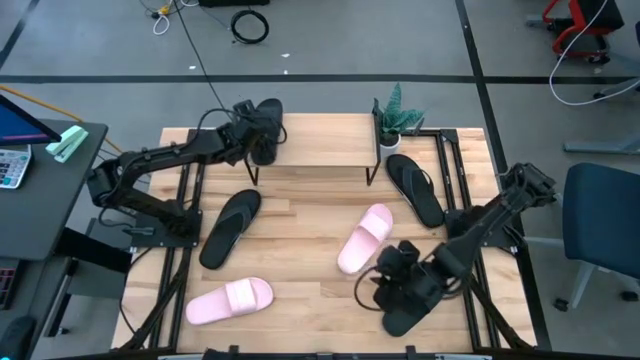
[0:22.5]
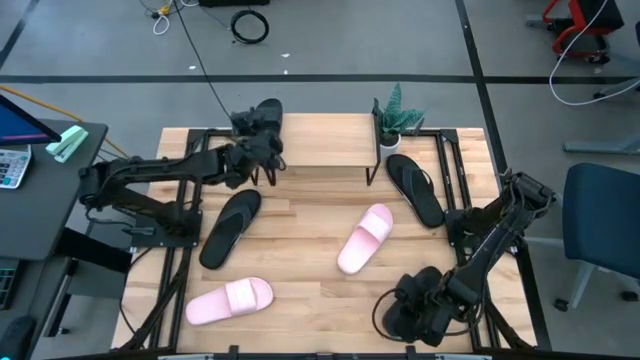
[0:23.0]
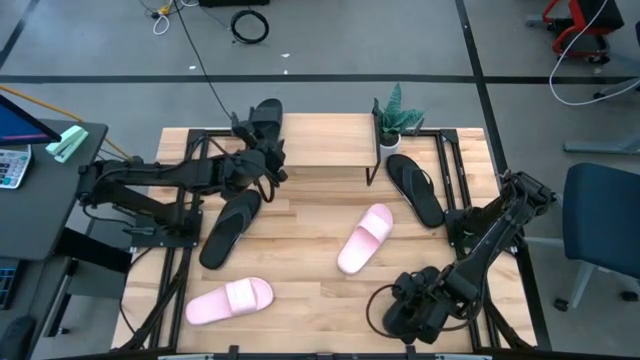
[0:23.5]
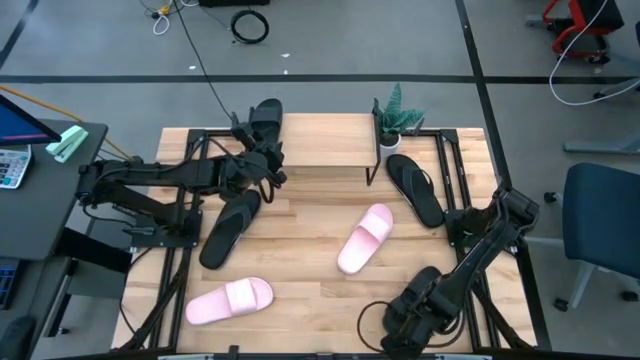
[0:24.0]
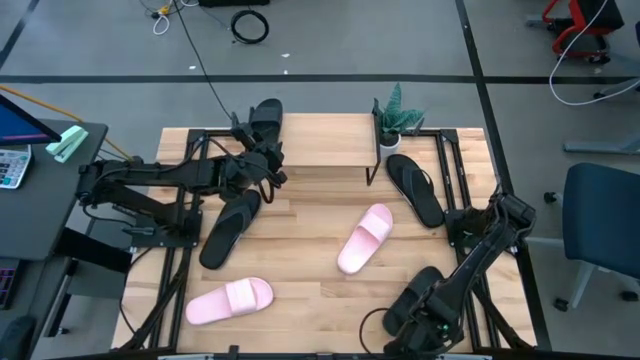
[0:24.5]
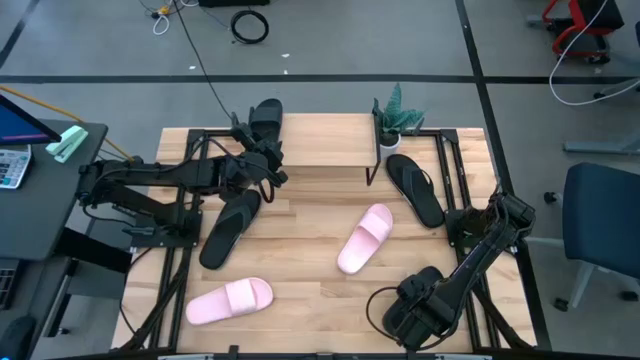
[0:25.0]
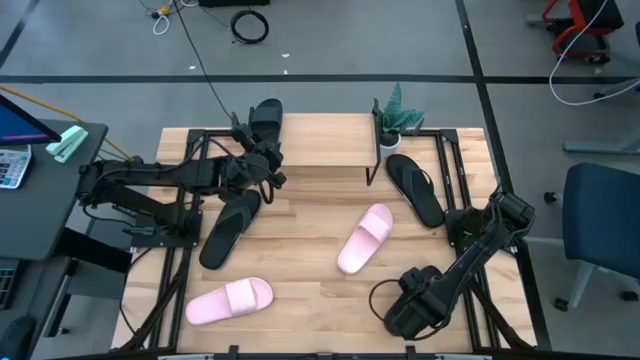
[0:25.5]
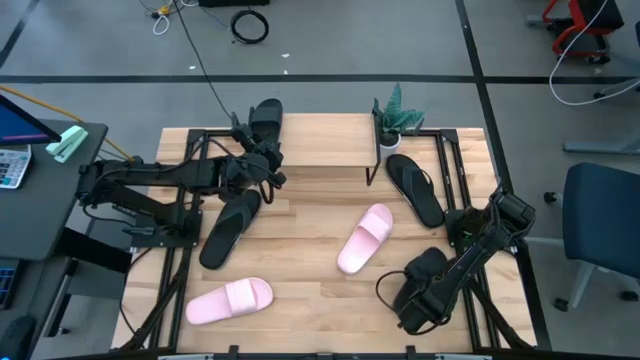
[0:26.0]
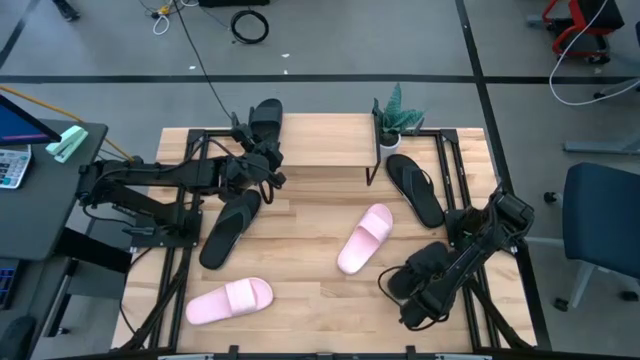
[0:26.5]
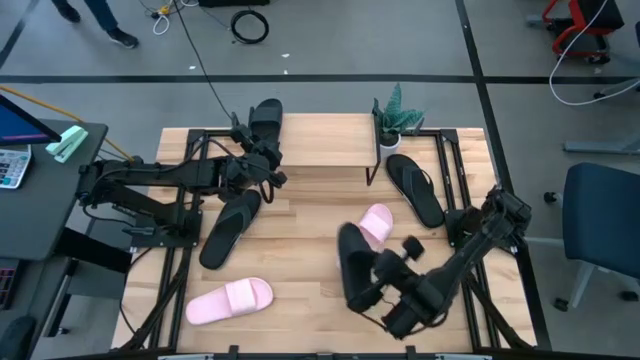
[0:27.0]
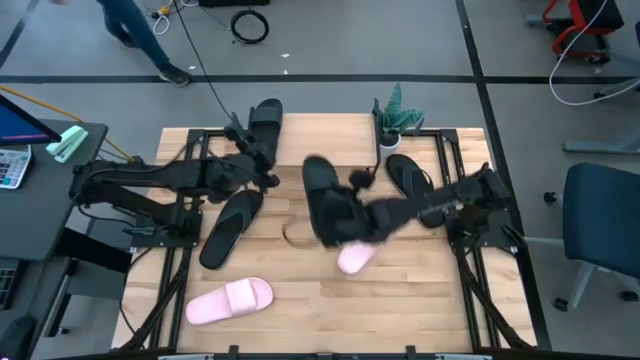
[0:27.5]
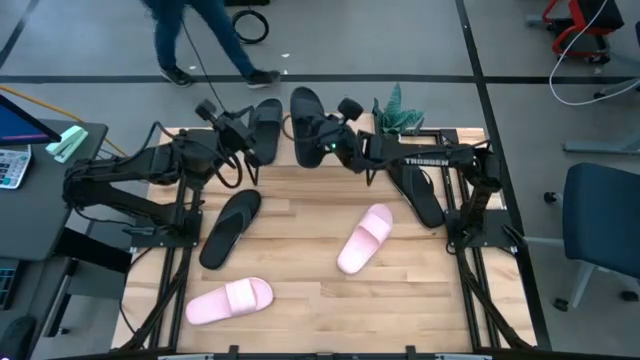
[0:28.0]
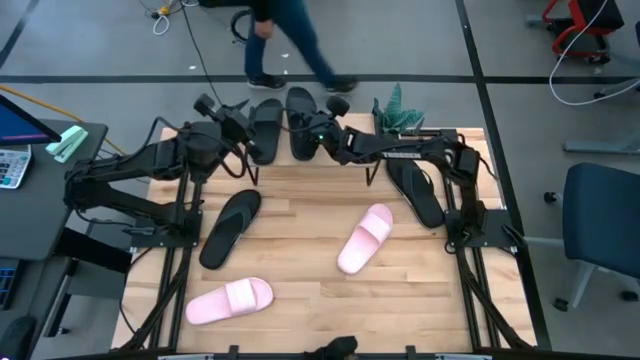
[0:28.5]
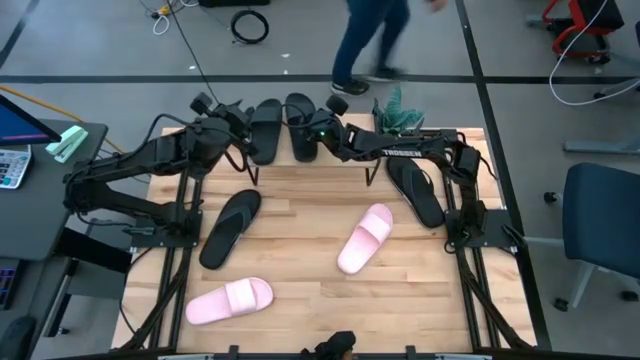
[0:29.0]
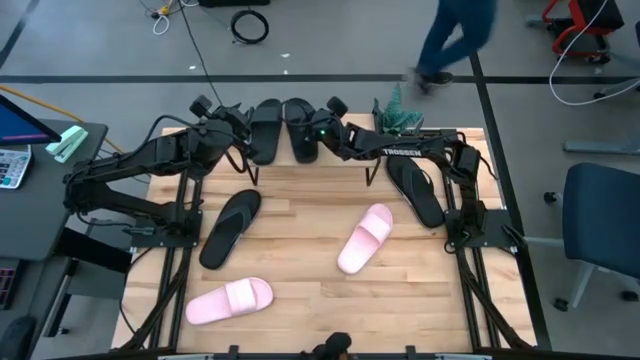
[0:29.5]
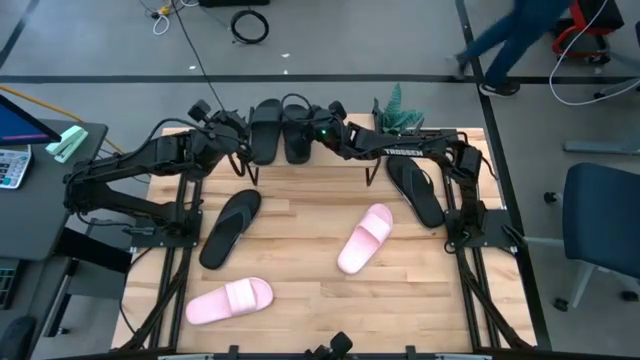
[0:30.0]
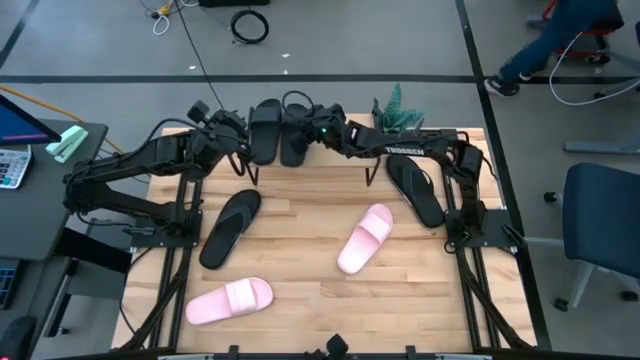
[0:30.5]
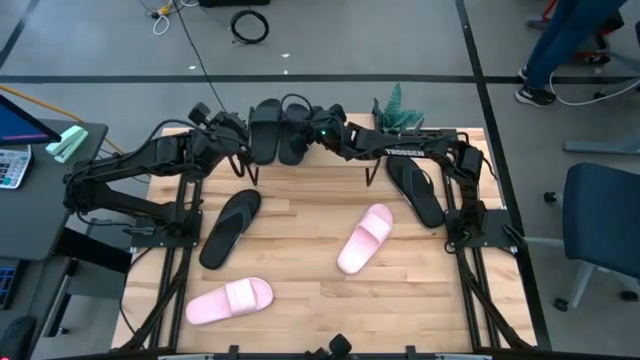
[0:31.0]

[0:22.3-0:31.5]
Task: Pick and place slides into the shelf
Put the bottom black slide on the shelf

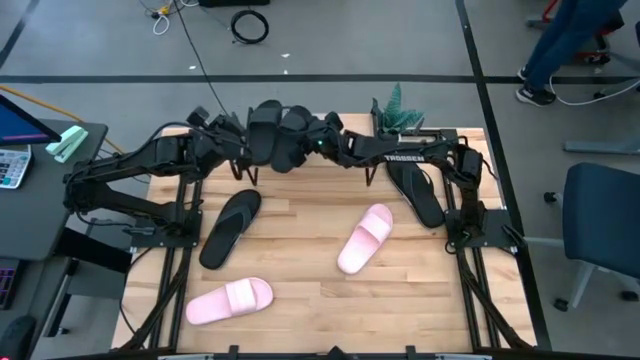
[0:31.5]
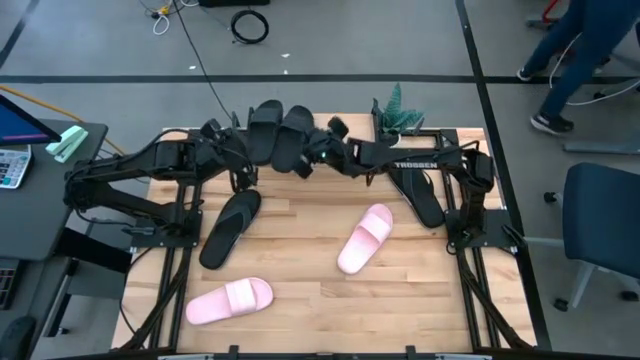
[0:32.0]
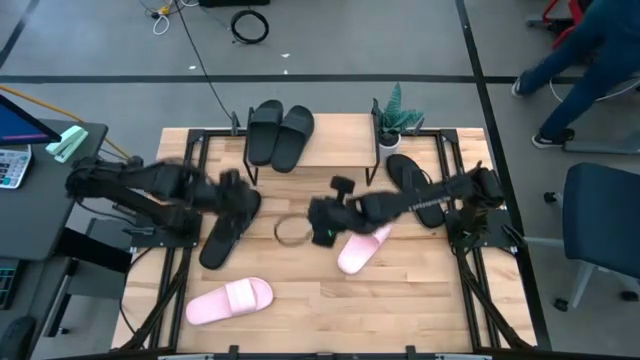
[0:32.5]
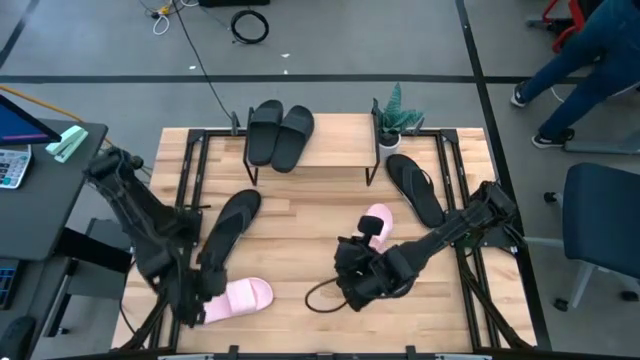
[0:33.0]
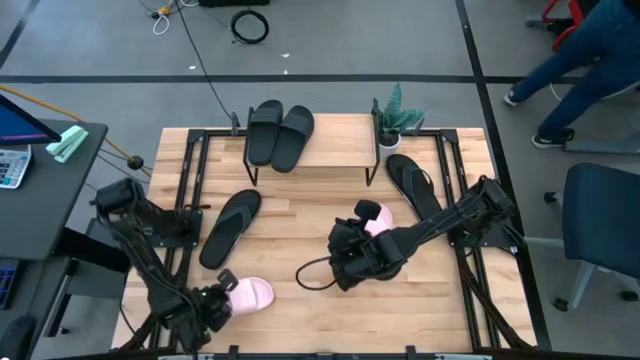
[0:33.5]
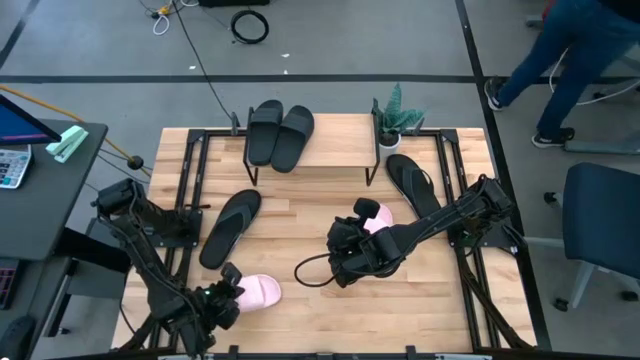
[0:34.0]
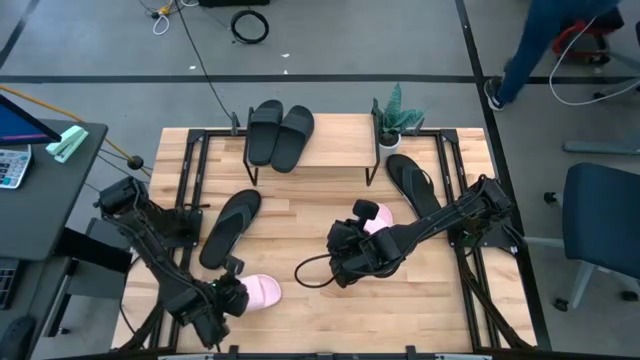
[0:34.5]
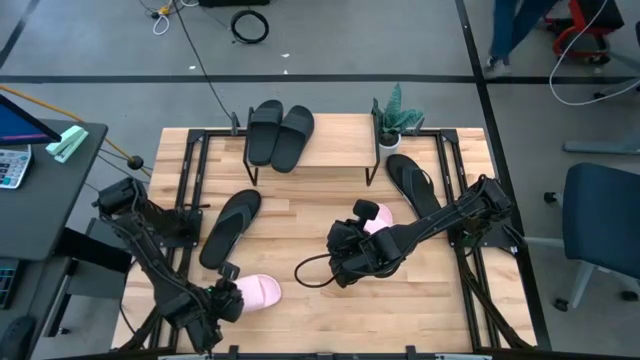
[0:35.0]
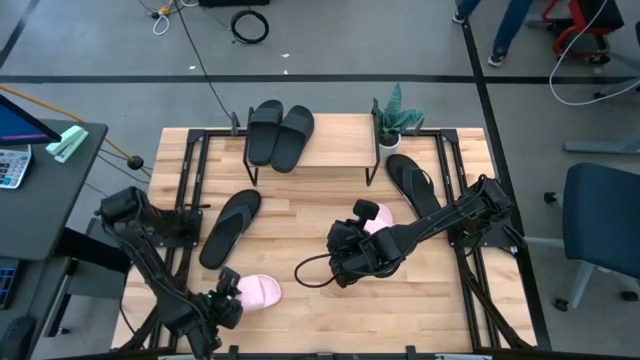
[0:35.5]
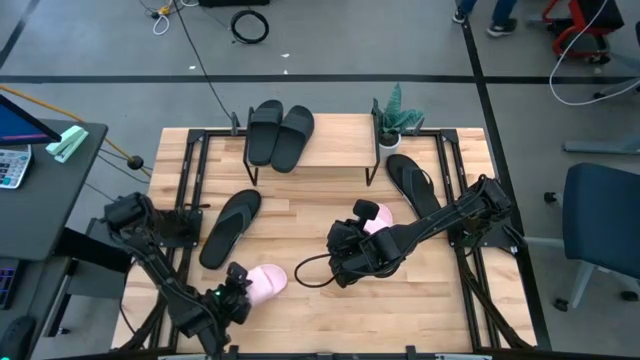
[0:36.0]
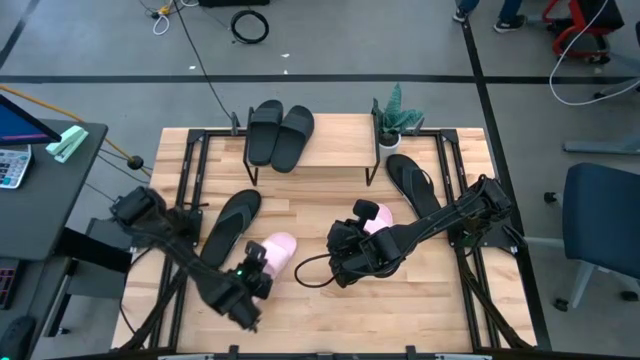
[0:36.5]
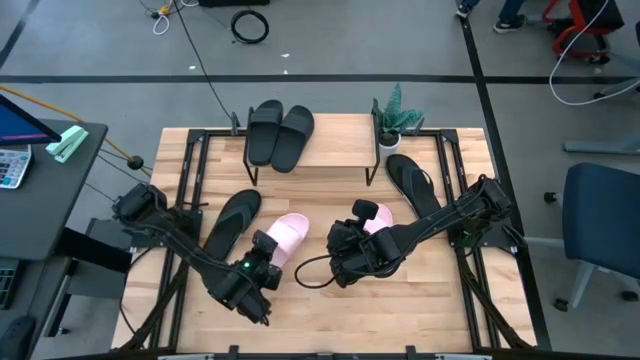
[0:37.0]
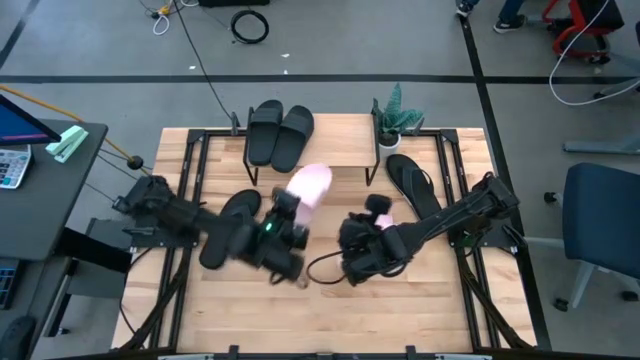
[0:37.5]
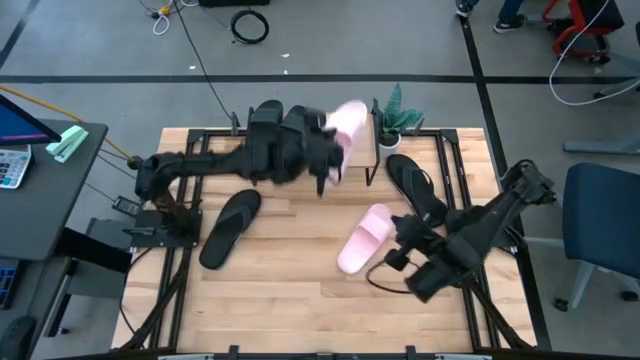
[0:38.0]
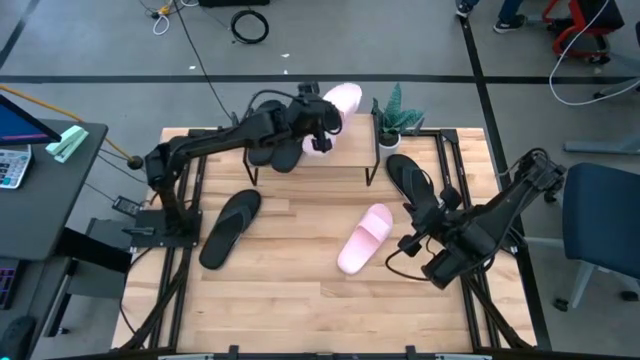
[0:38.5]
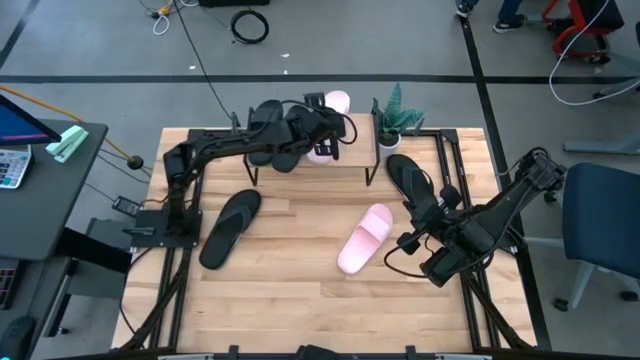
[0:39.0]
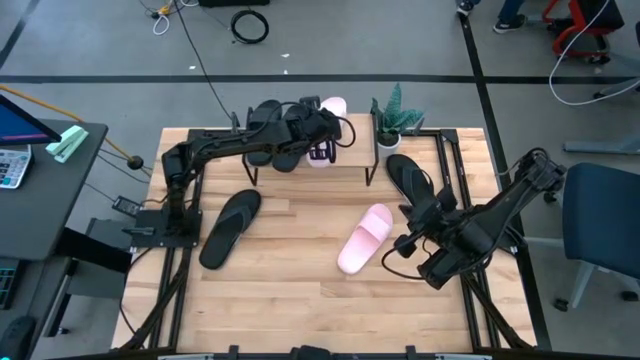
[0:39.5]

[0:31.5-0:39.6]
Put the left pink slide on the shelf

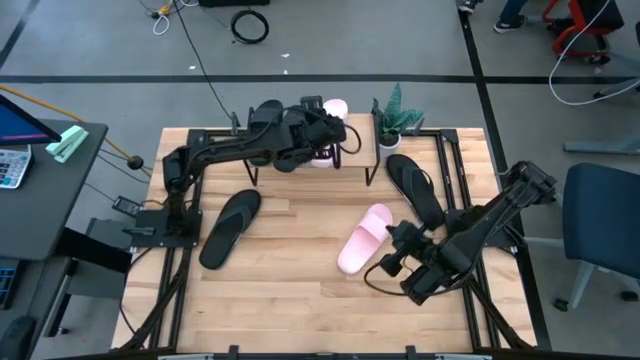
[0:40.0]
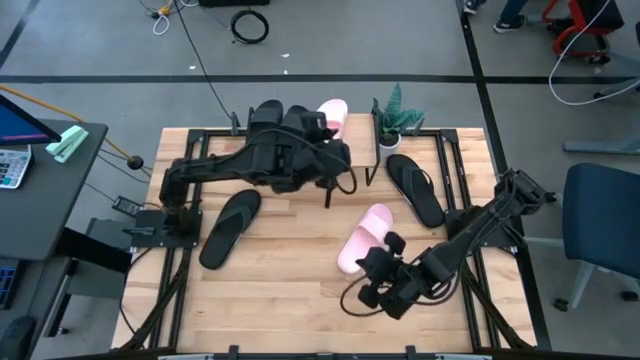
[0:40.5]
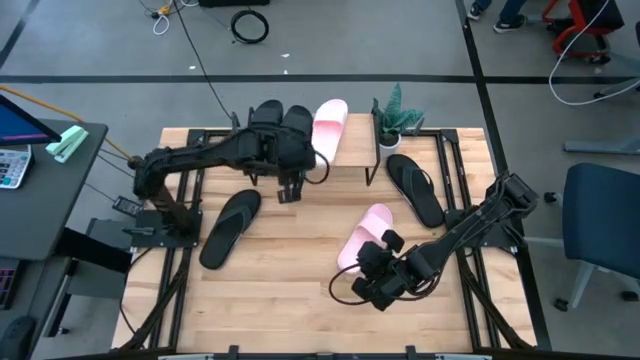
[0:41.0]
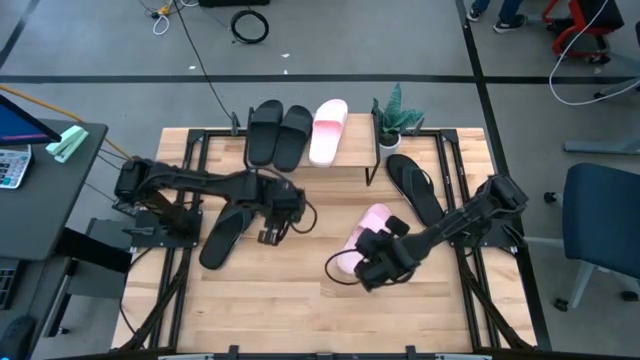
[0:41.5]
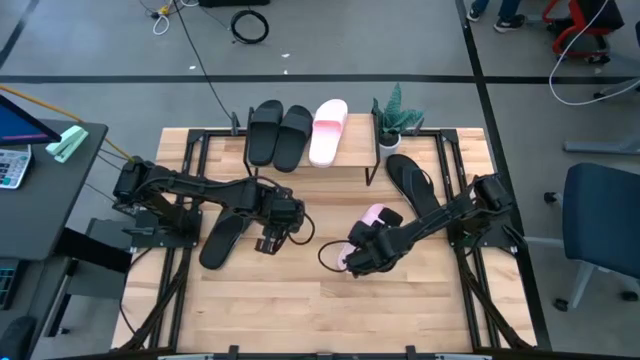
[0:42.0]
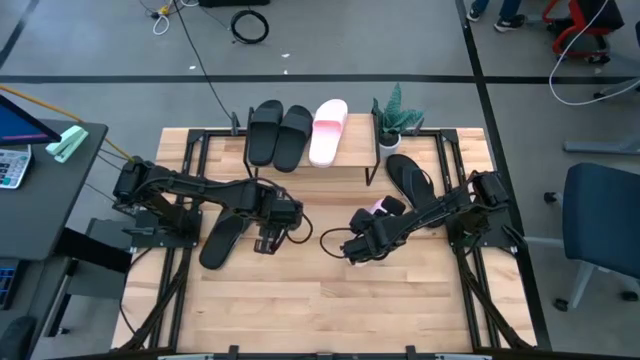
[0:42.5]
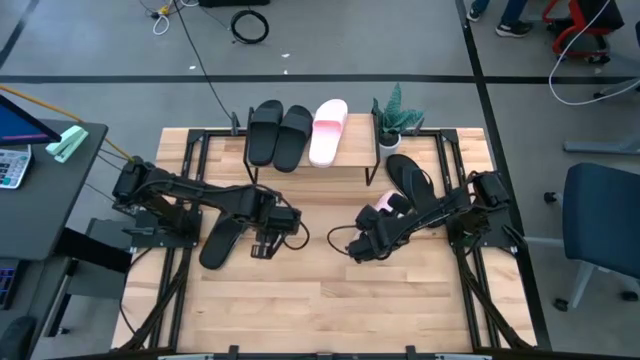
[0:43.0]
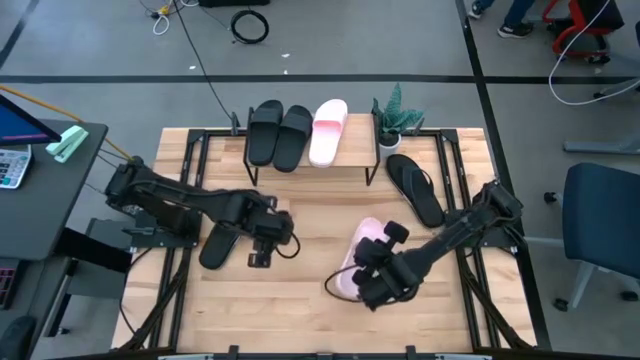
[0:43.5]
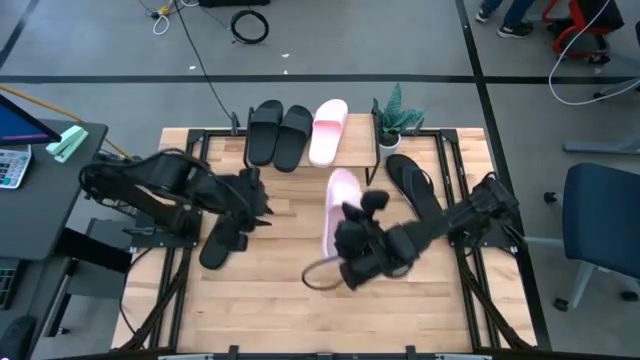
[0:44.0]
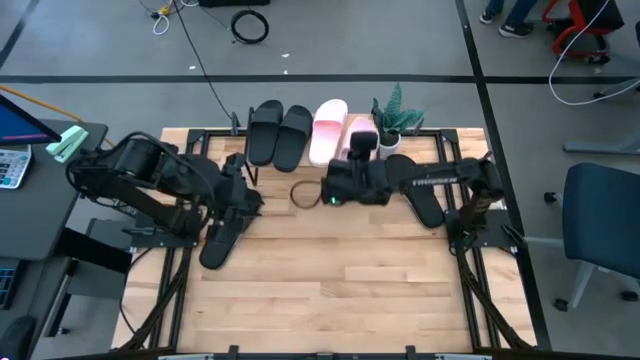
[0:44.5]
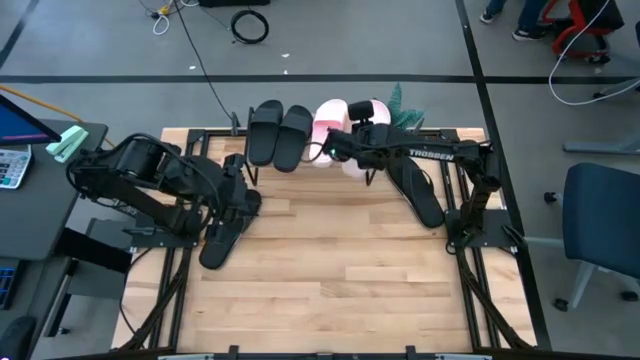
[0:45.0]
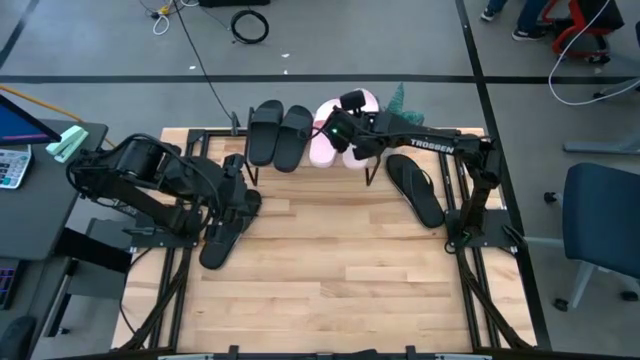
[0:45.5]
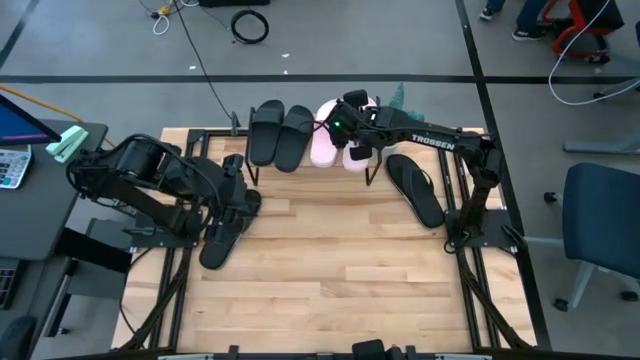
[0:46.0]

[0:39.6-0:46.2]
Put the pink slide on the shelf
